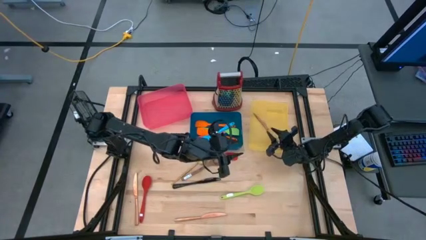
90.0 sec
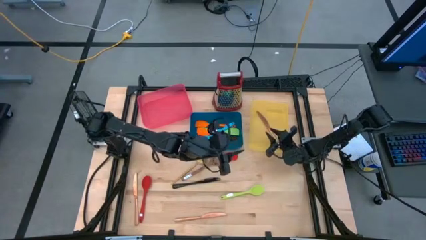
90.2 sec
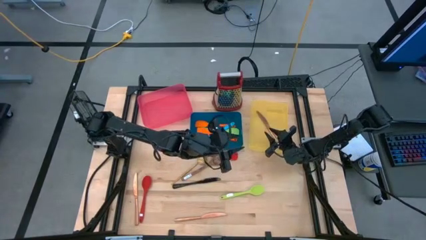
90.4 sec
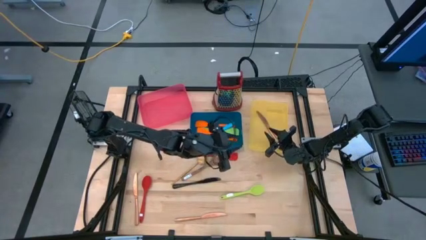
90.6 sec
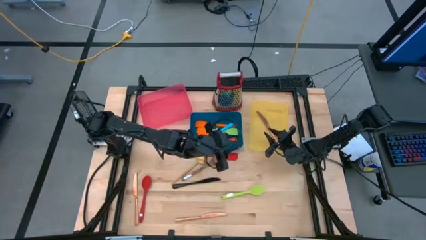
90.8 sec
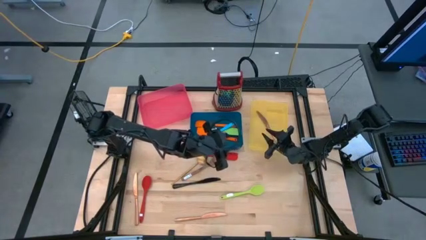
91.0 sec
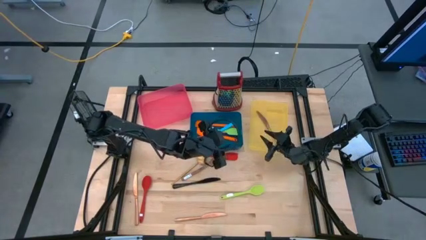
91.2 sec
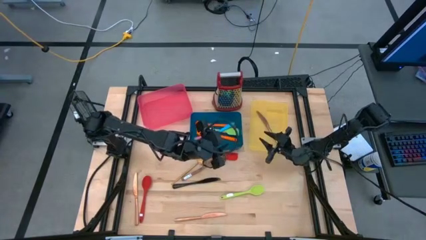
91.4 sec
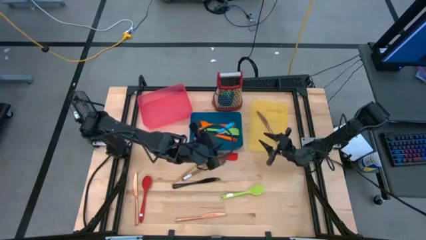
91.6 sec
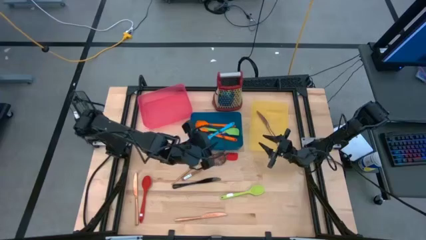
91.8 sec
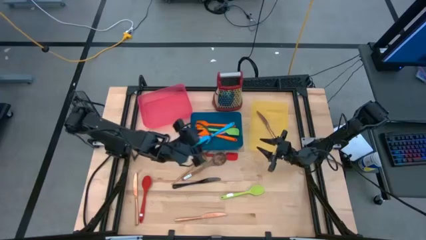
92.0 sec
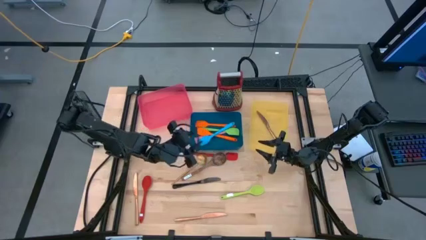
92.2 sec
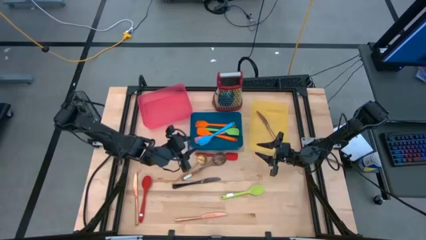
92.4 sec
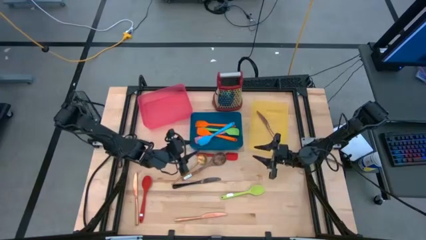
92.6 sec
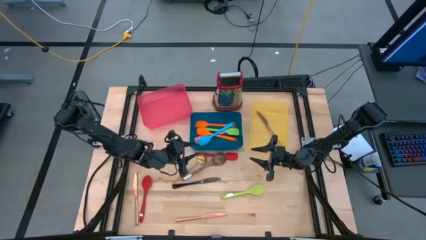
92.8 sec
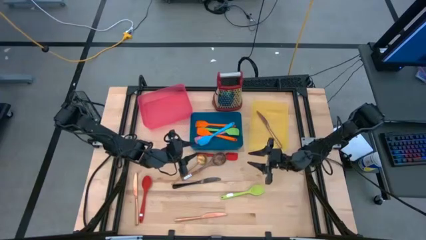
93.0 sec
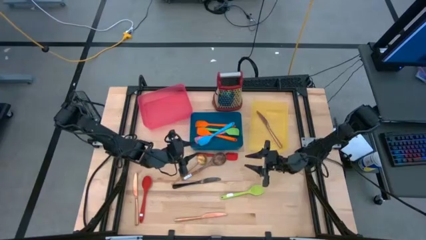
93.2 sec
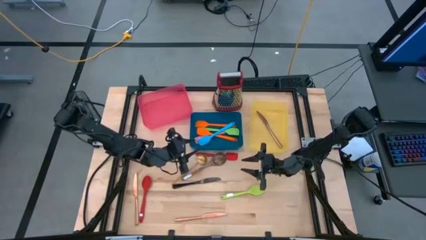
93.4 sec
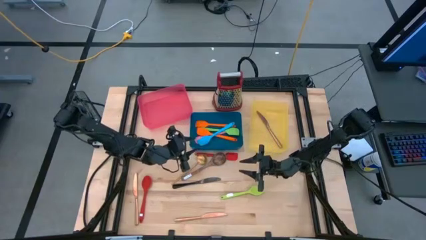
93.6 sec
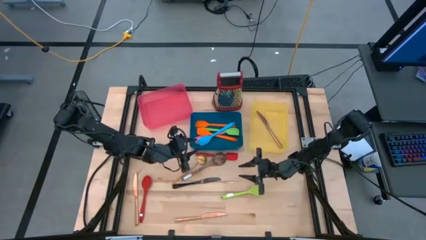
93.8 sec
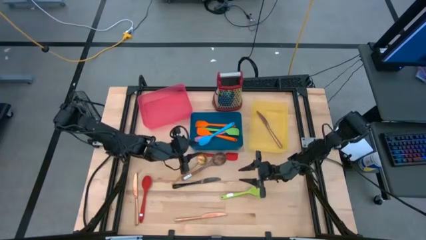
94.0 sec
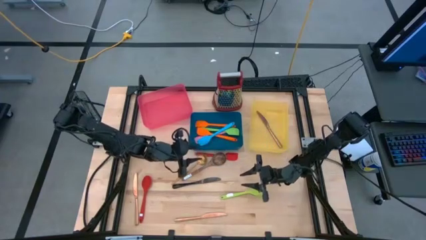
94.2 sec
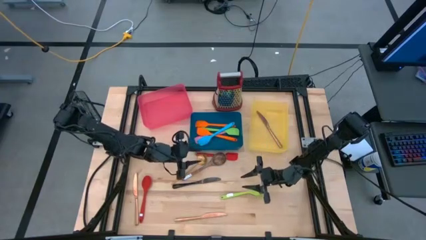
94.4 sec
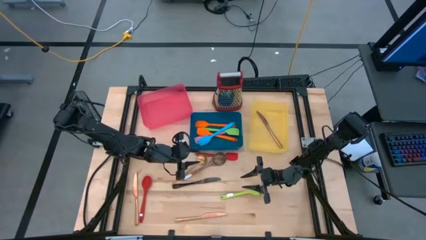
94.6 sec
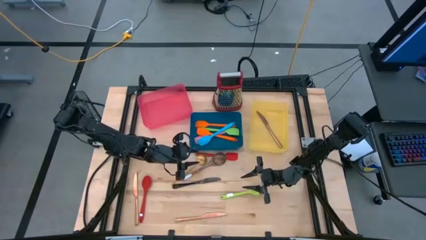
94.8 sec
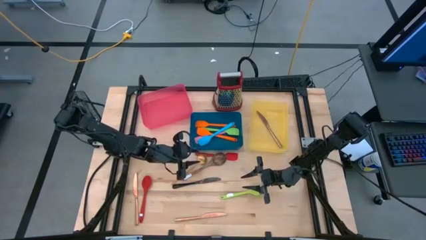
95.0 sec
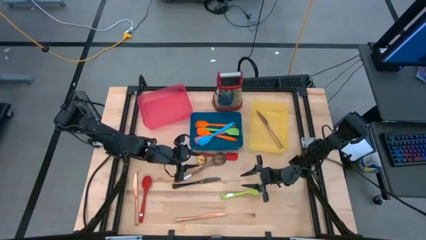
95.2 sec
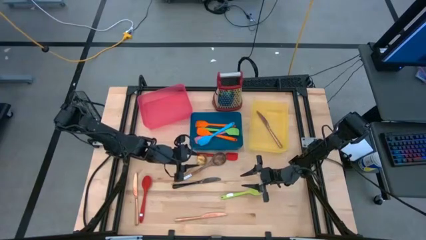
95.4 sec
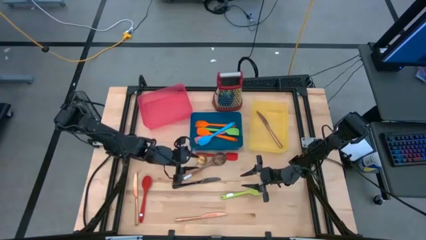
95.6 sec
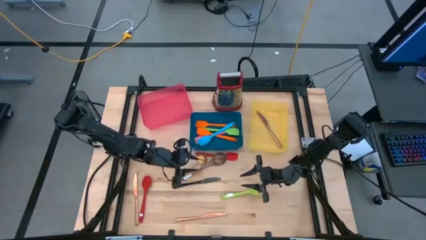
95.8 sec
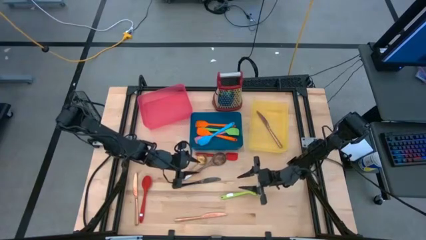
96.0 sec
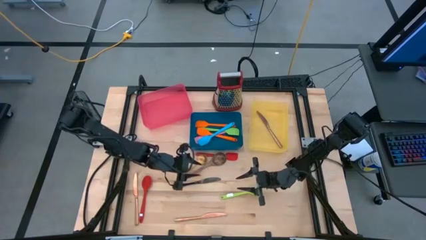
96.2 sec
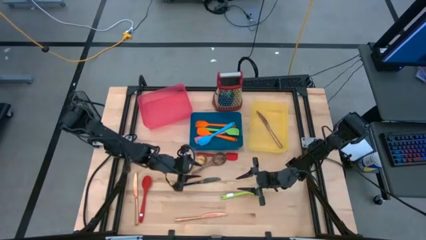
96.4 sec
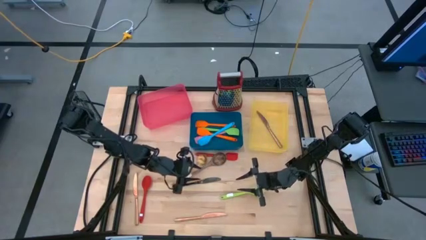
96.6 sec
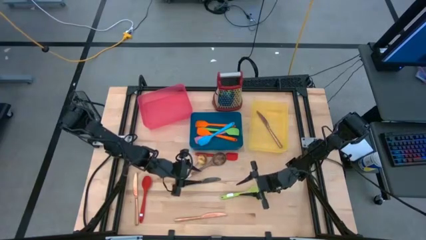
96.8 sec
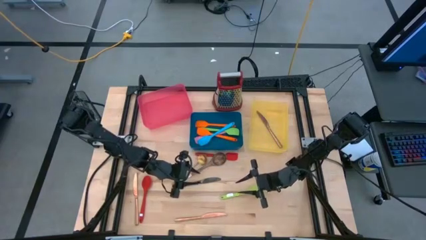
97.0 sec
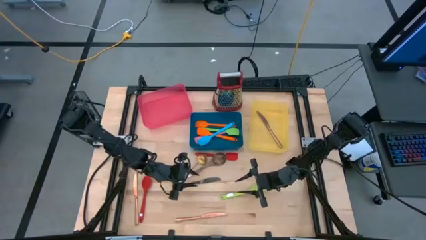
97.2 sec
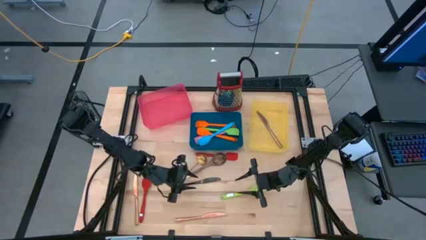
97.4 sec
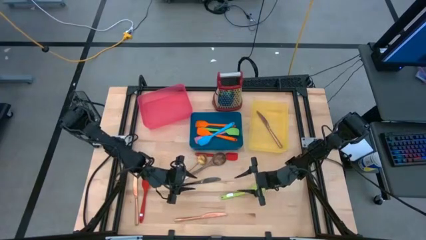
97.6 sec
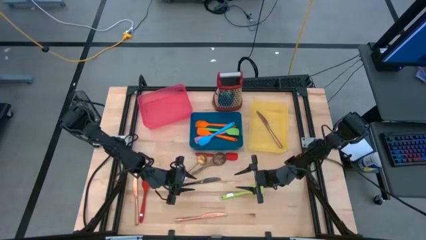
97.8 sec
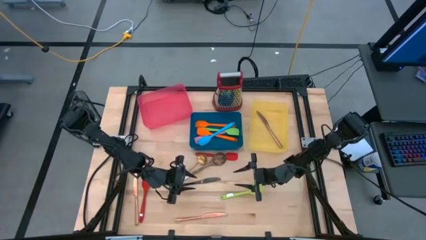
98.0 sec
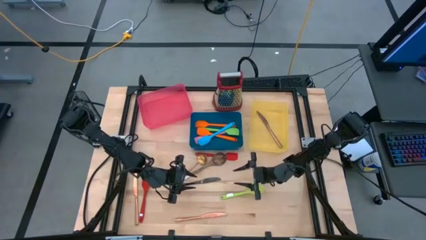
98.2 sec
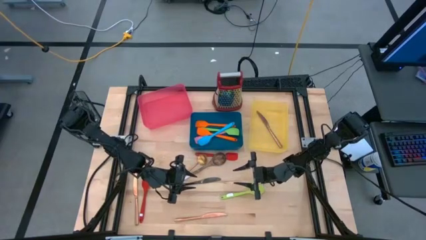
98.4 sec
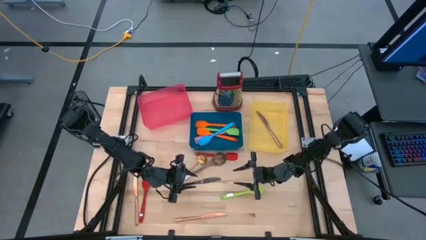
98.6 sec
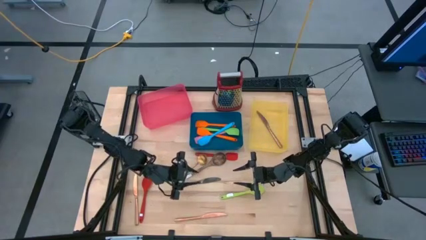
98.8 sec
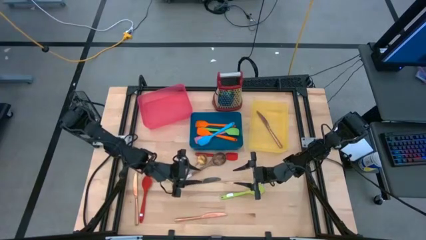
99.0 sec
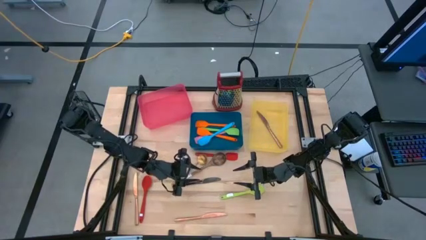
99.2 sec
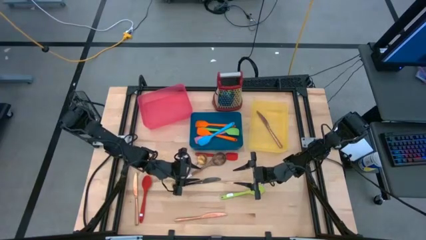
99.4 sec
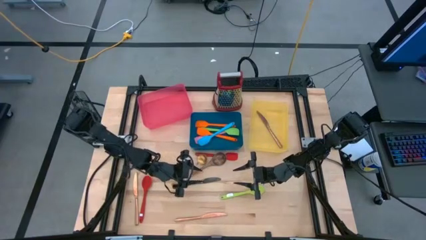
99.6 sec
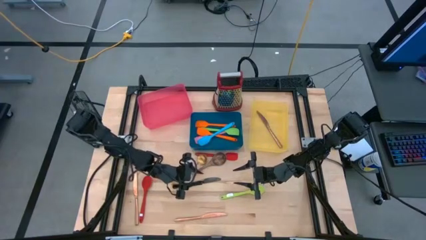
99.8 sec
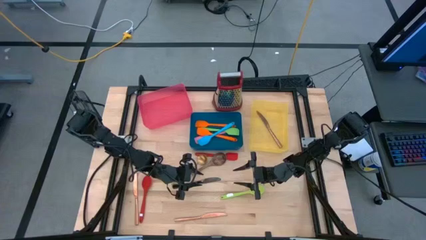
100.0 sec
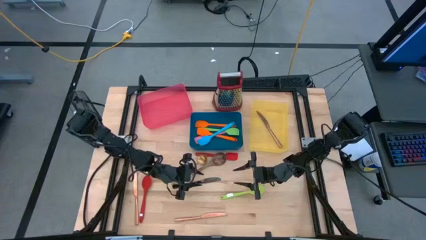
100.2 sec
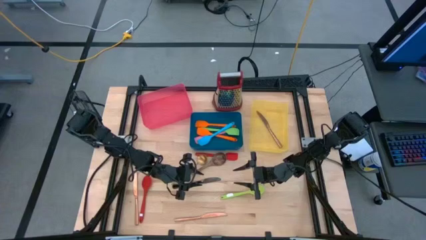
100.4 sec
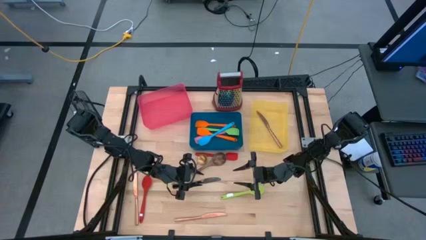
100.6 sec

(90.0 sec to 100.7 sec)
Task: Pick & Place Kitchen Items
Put the black table knife into the yellow bin

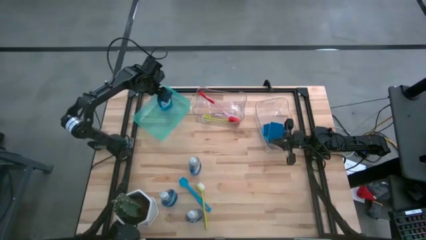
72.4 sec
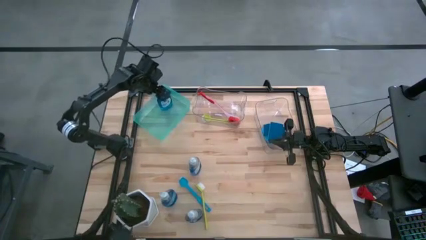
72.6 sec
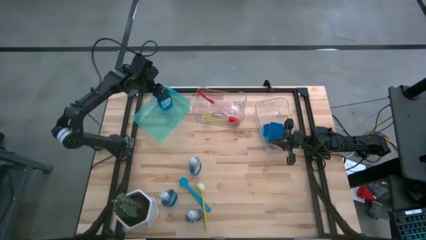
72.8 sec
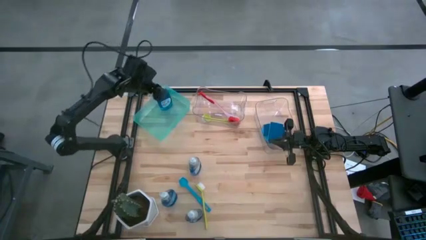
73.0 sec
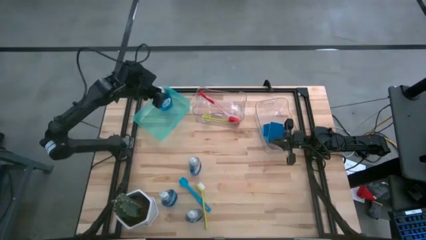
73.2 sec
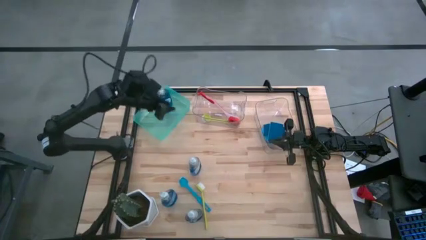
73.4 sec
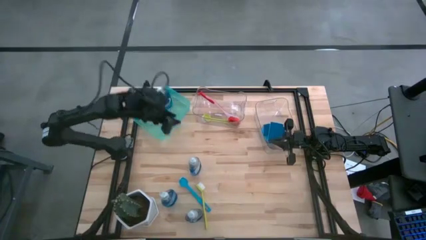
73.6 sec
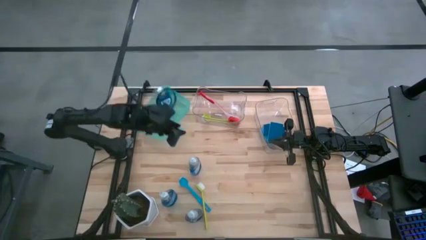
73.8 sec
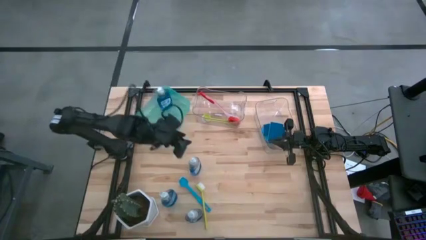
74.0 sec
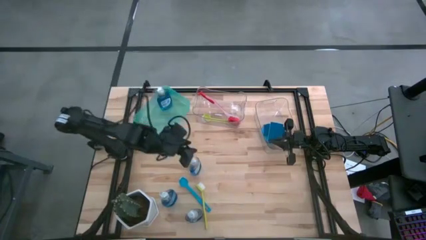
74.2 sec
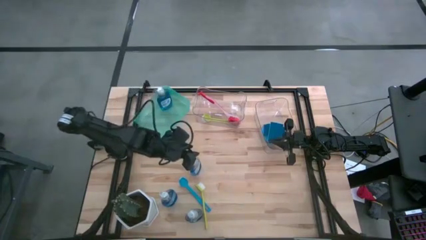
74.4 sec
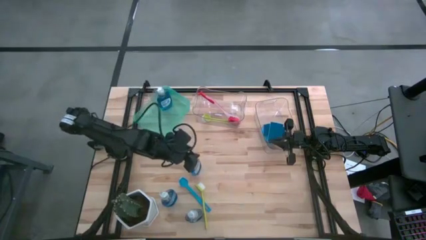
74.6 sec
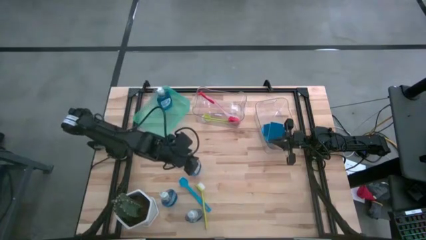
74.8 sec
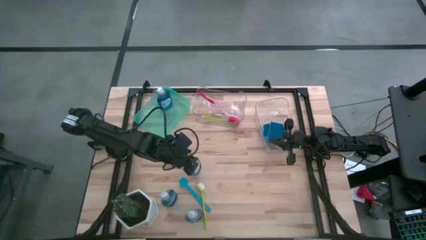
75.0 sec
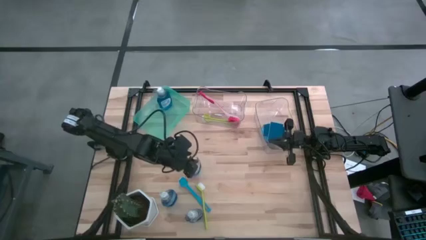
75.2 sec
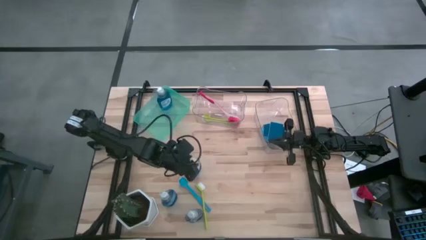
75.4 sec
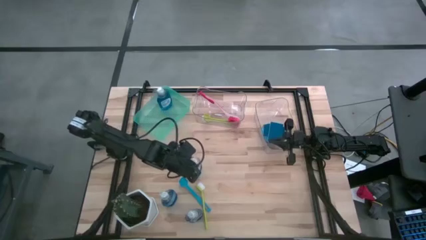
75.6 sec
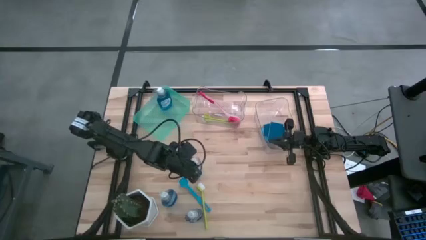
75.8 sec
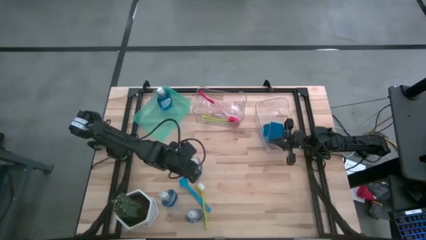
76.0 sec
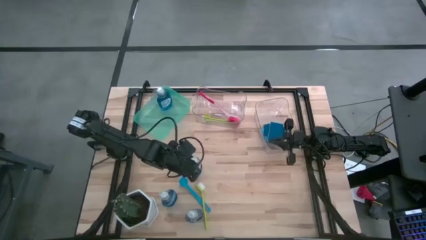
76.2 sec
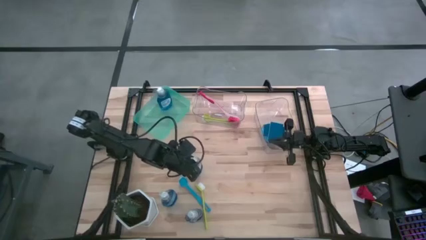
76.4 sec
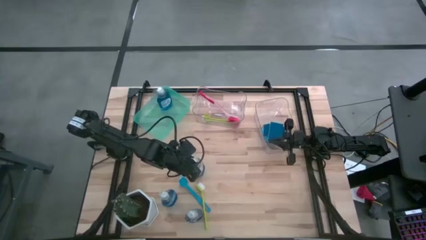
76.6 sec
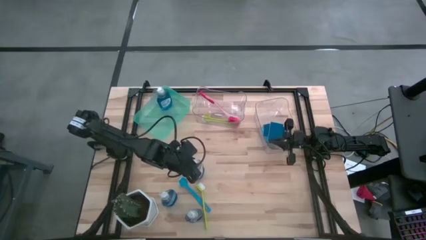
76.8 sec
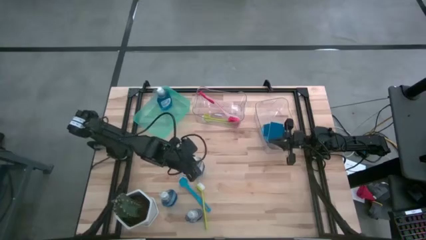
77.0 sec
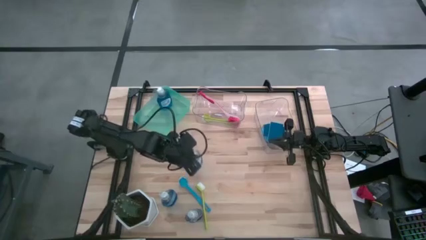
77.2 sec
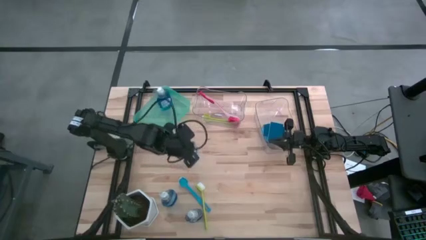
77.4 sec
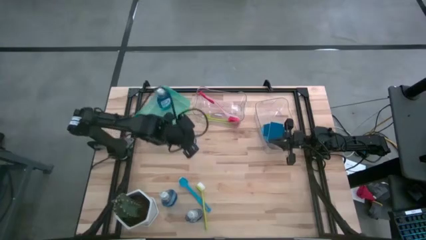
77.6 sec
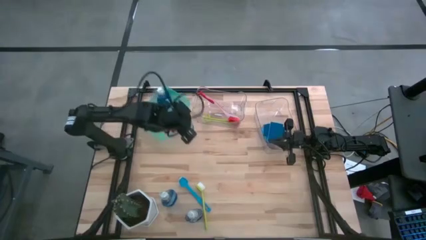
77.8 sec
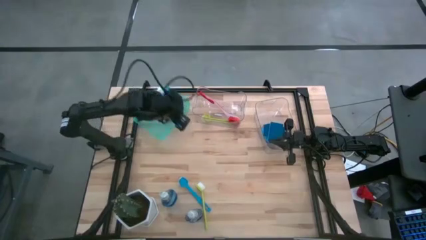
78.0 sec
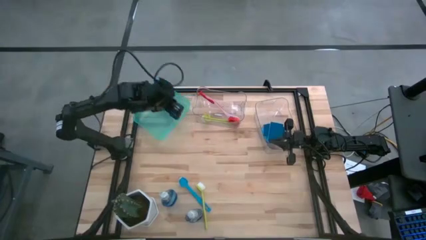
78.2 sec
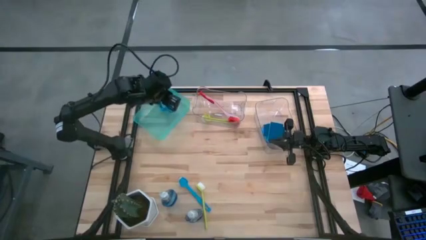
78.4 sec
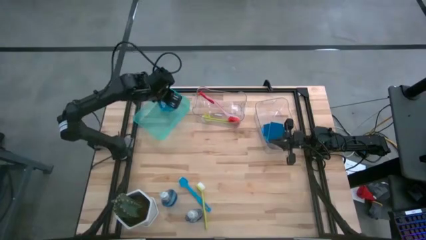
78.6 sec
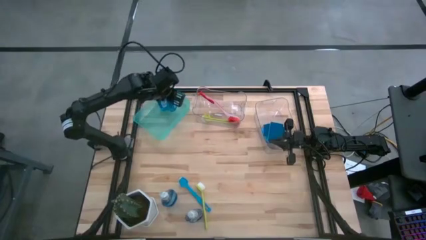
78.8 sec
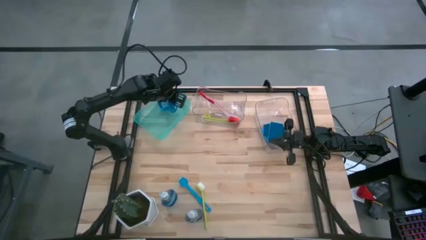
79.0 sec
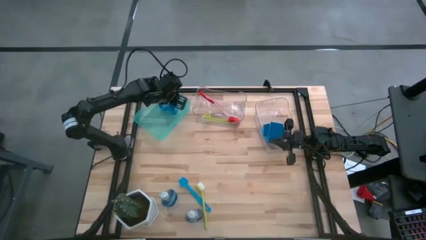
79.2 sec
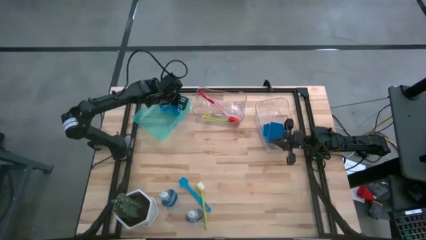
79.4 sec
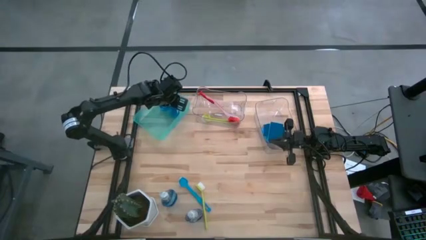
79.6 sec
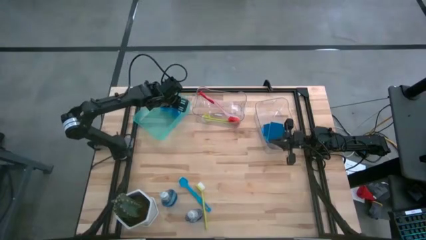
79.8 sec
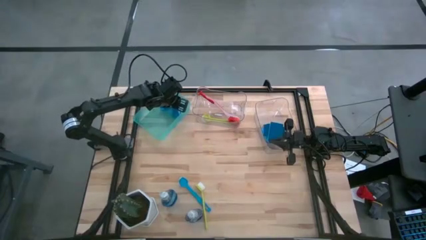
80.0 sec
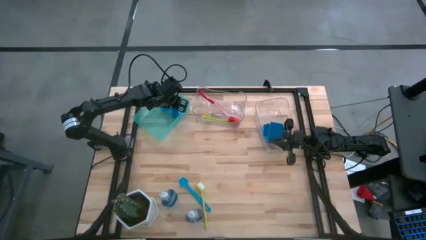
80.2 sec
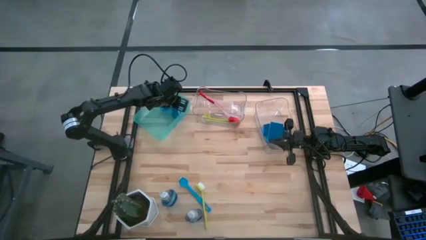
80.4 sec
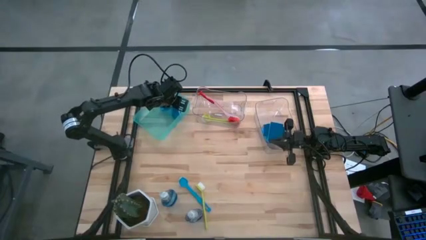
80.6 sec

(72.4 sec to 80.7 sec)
Task: Pick & Place Kitchen Sink Supplies
Put the transparent soap dispenser in the green bin
